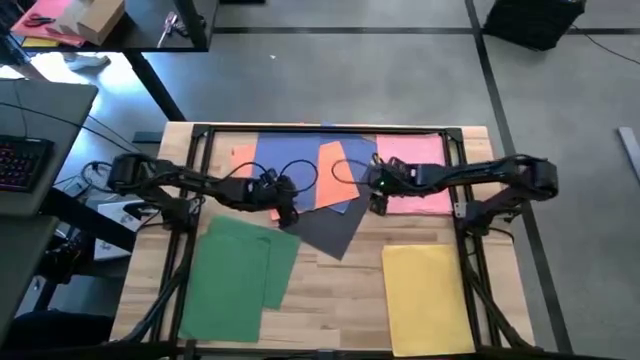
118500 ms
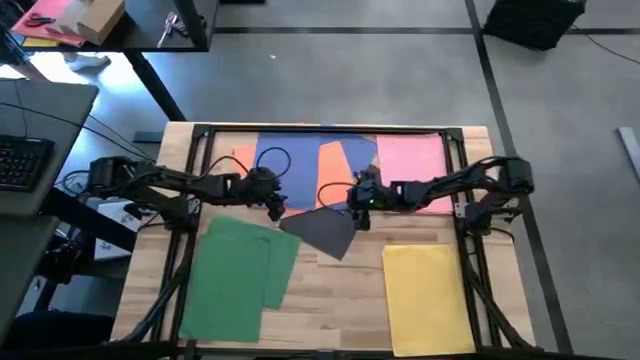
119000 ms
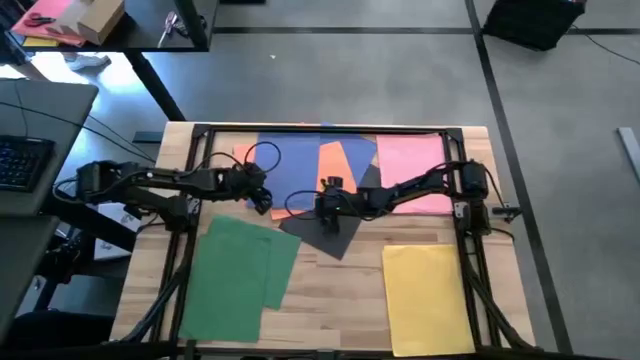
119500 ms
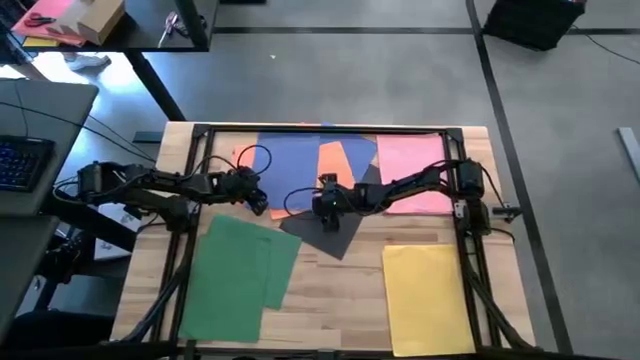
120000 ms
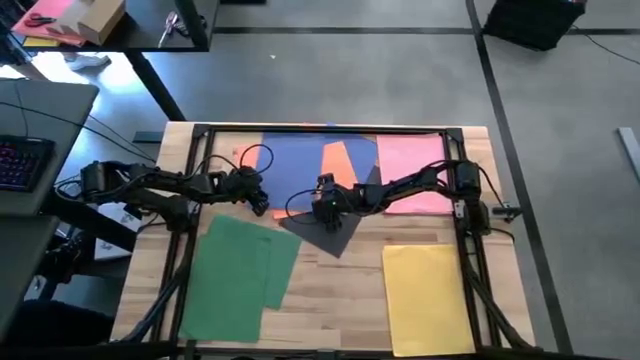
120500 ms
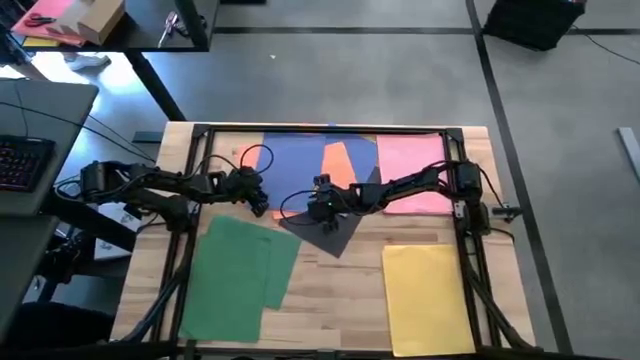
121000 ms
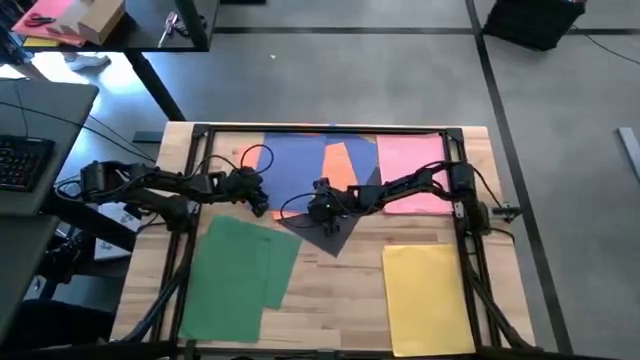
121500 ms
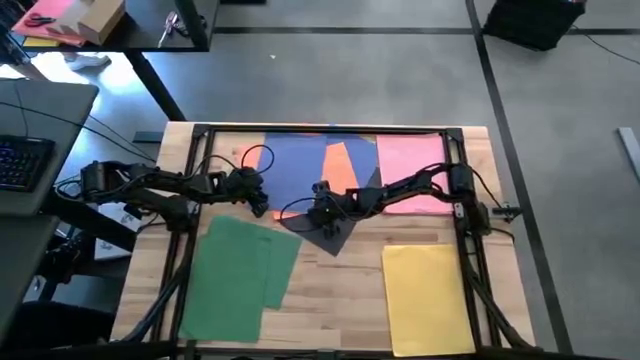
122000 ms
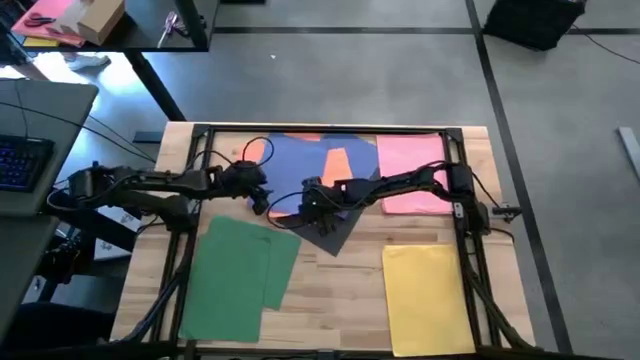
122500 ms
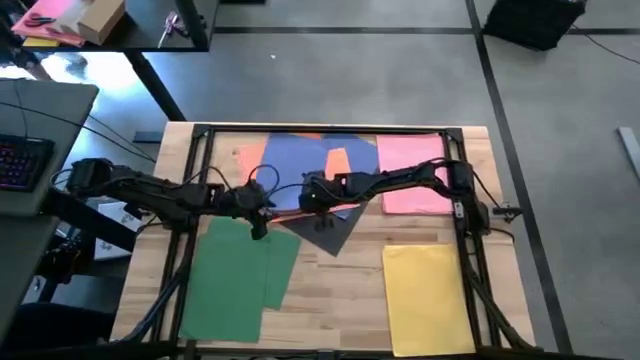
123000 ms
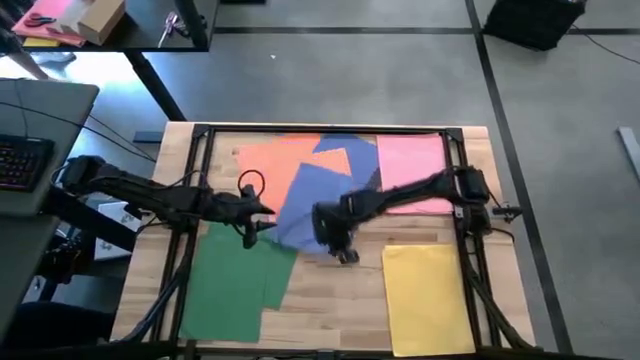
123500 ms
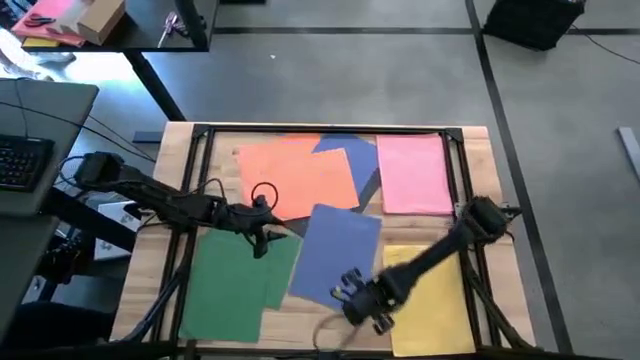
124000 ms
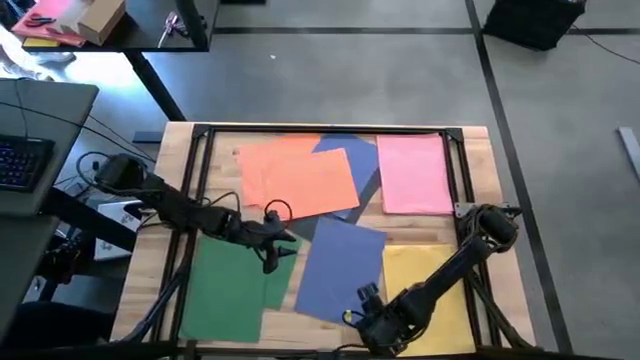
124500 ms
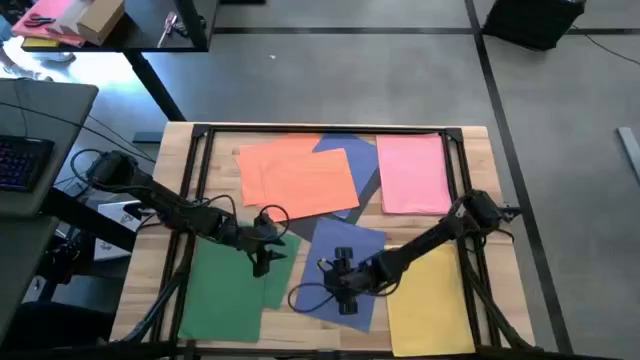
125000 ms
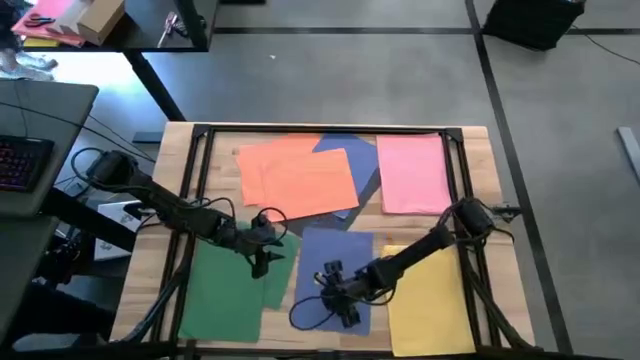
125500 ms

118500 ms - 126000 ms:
Task: Organize paper
Move the blue paper to the bottom middle of the table

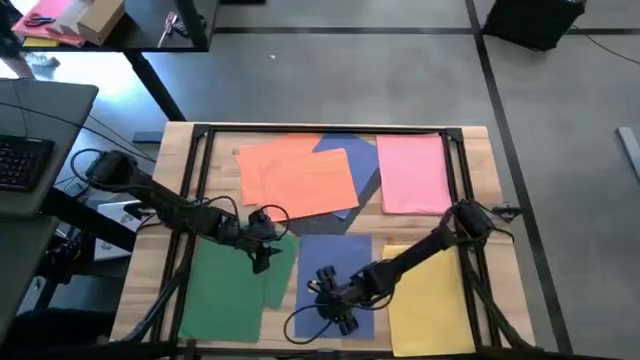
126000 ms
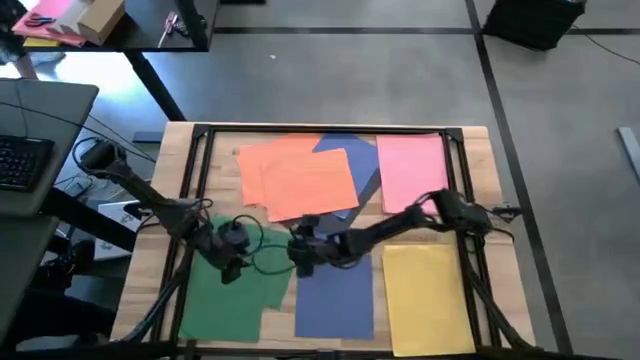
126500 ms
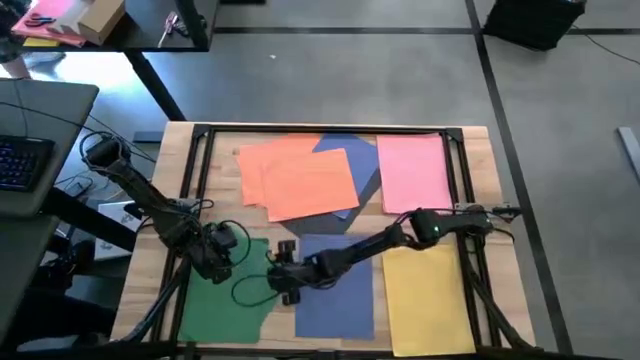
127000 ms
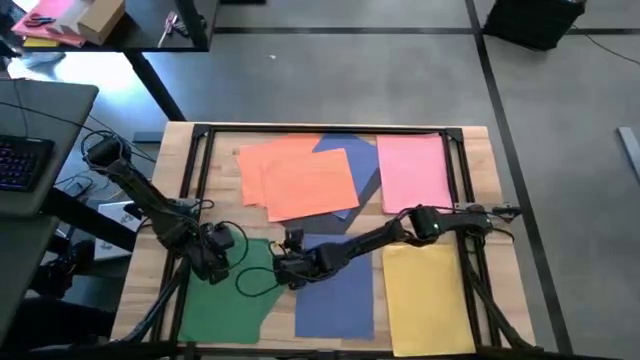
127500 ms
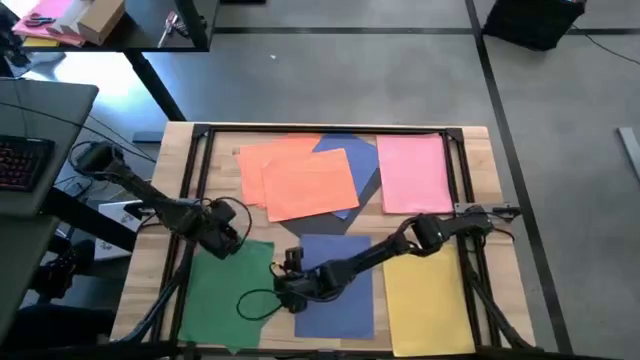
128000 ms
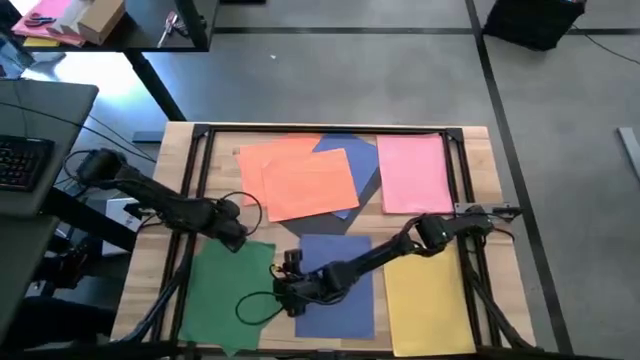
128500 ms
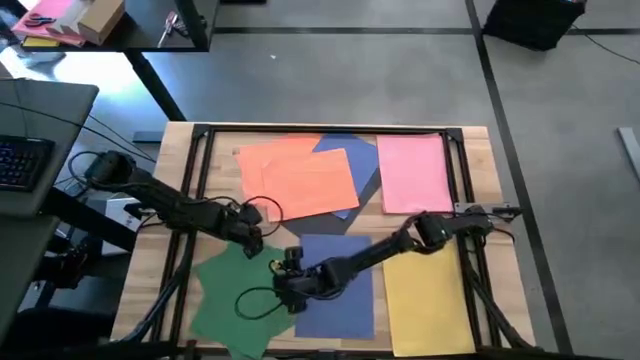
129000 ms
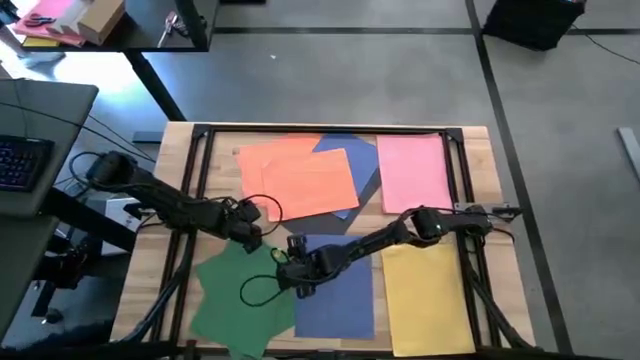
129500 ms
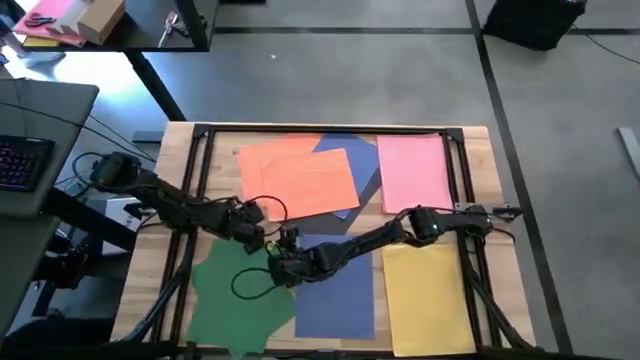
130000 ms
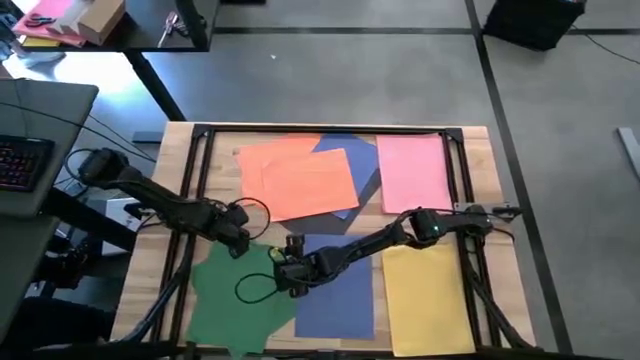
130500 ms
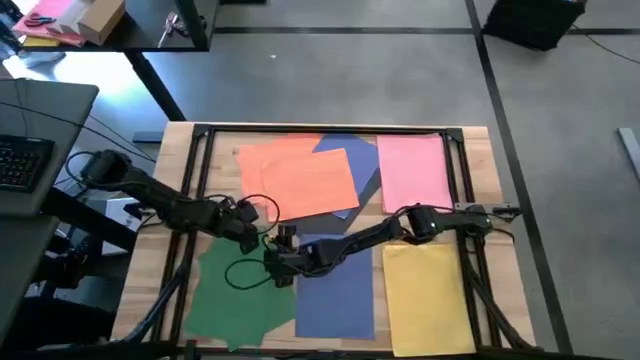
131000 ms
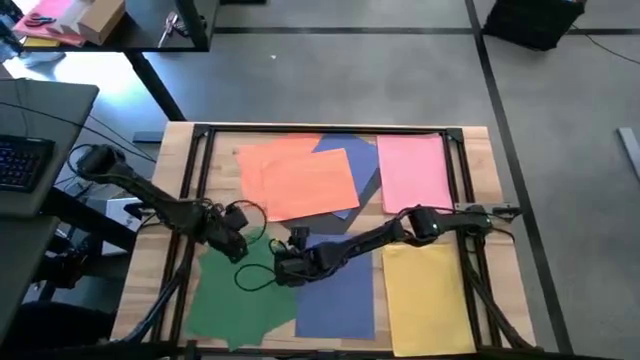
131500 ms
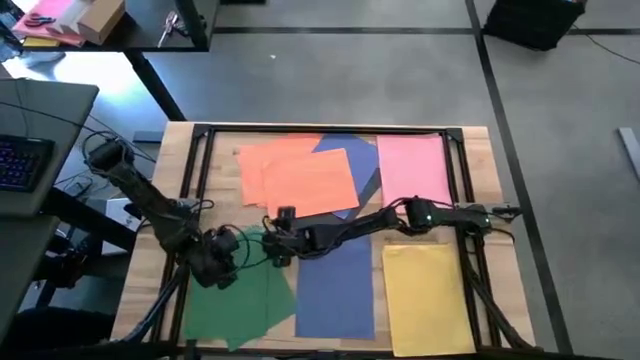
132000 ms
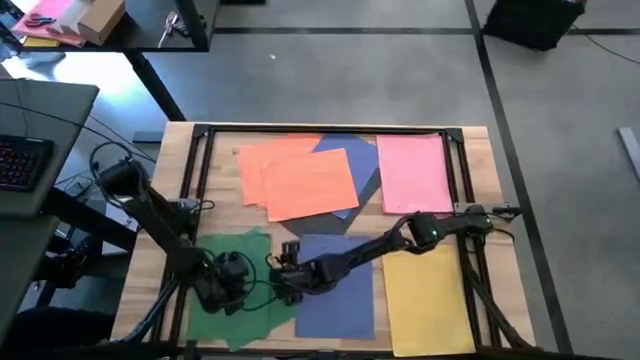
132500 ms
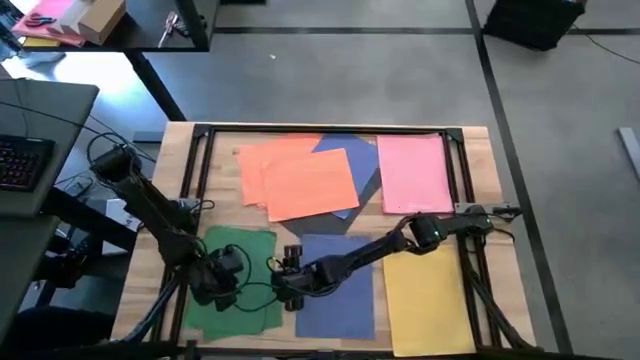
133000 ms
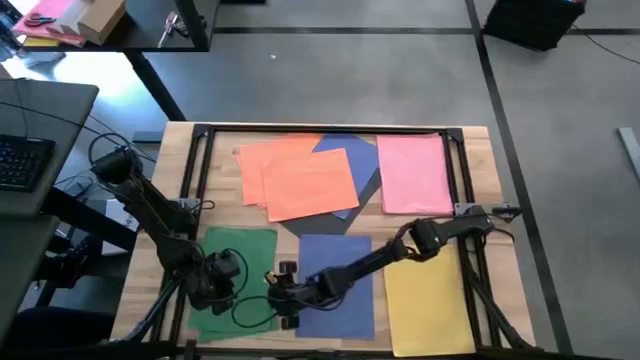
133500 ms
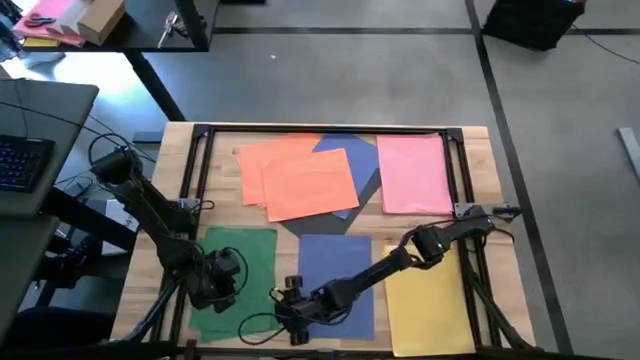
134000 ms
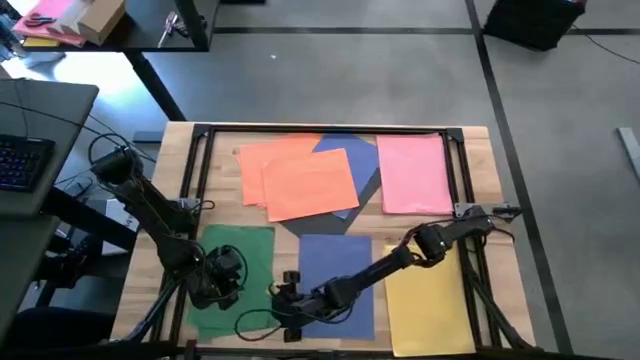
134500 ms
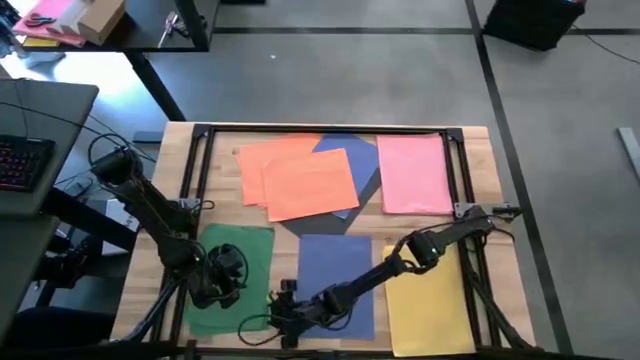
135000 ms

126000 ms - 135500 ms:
Adjust the green papers on the bottom left of table

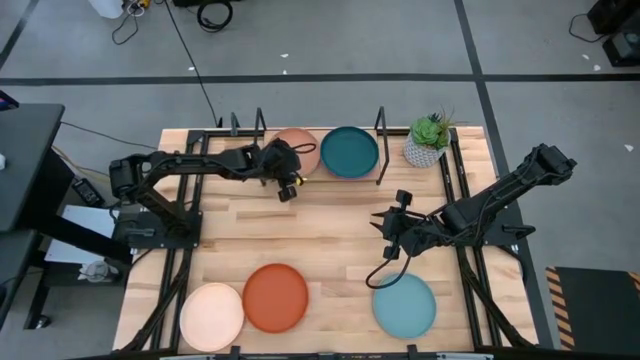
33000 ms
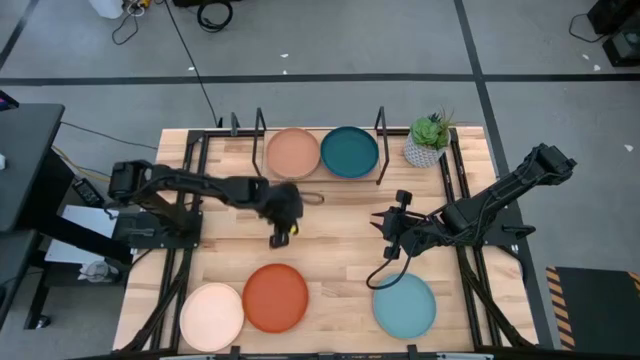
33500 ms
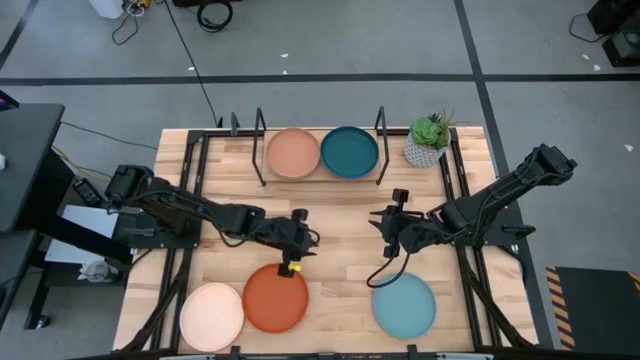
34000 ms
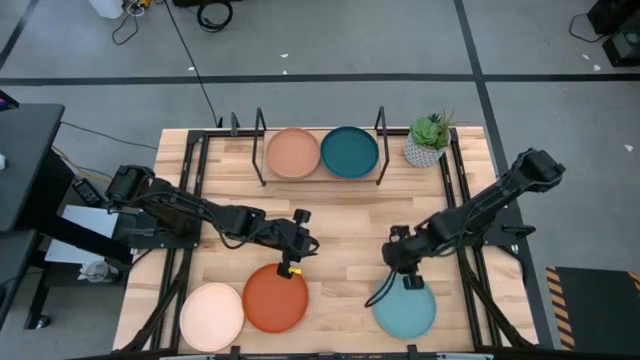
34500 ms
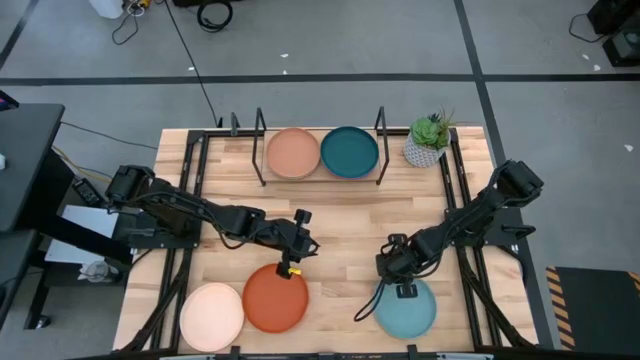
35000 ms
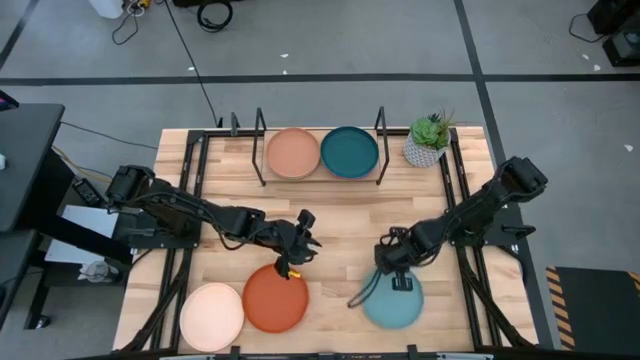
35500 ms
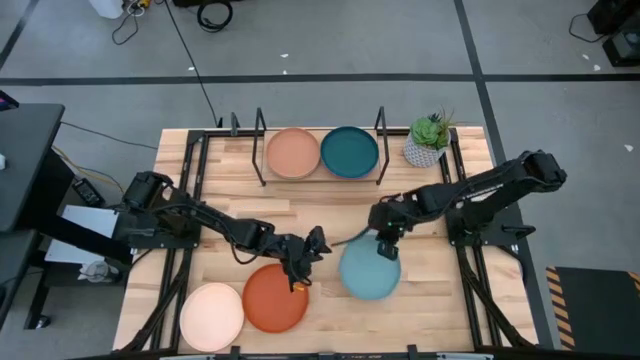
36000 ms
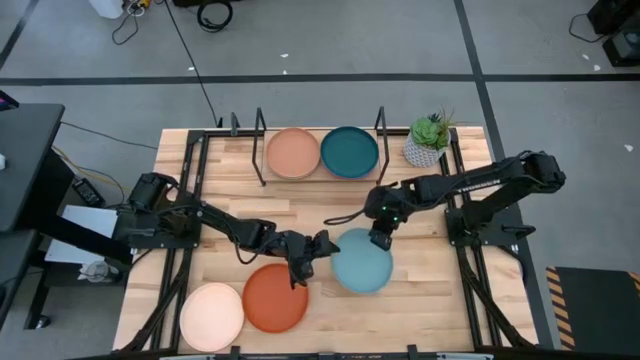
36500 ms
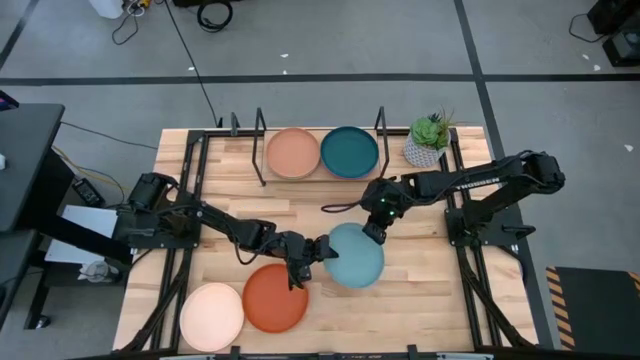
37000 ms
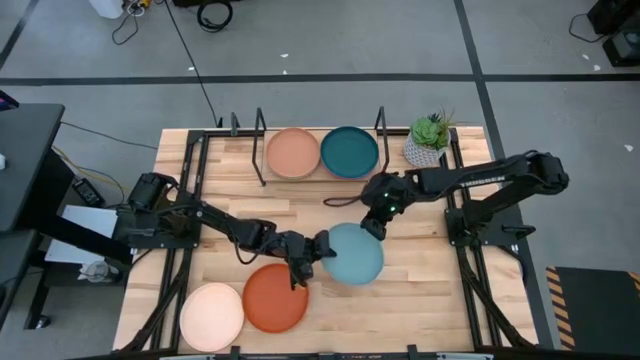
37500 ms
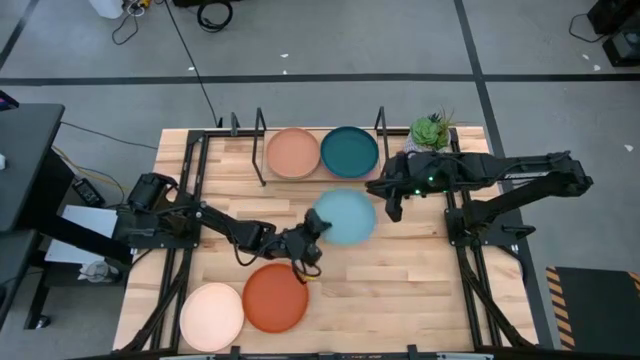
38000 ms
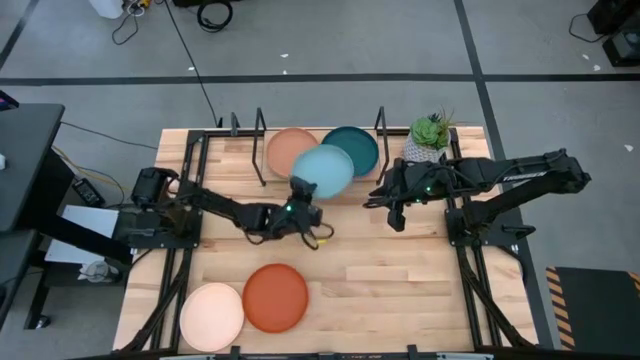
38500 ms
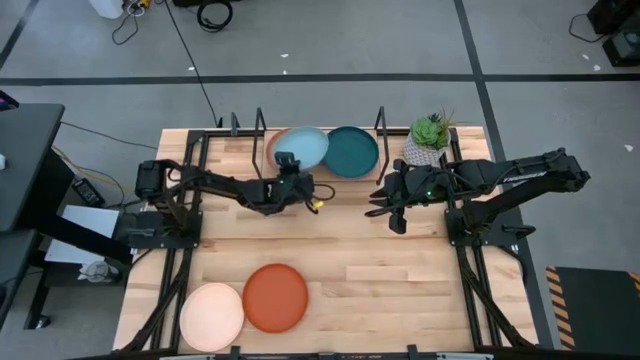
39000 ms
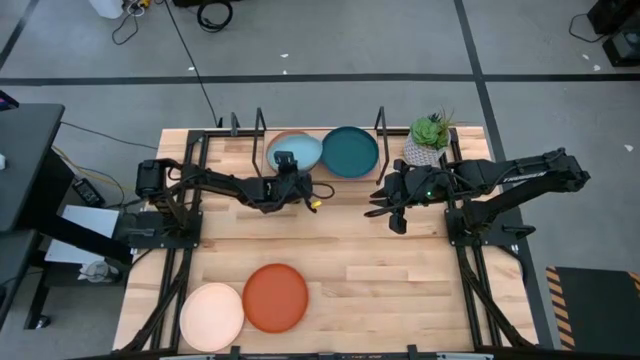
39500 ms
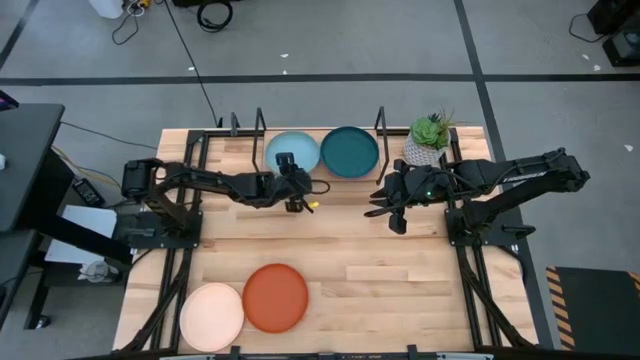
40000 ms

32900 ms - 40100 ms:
Task: Place and stack plates onto a shelf
Stack the light blue plate on top of the brown plate on the shelf
